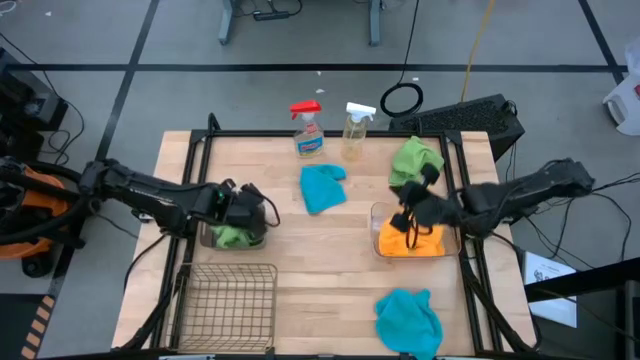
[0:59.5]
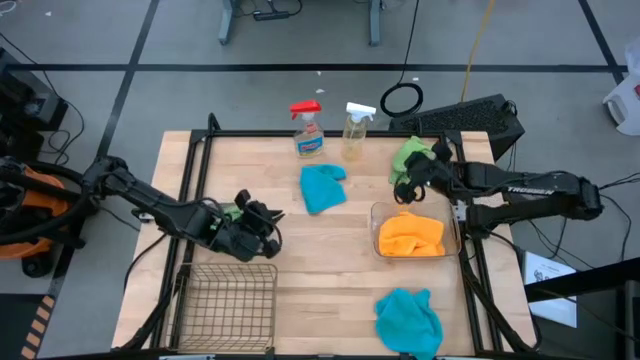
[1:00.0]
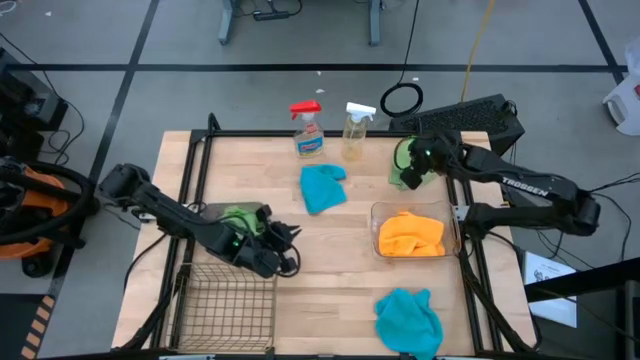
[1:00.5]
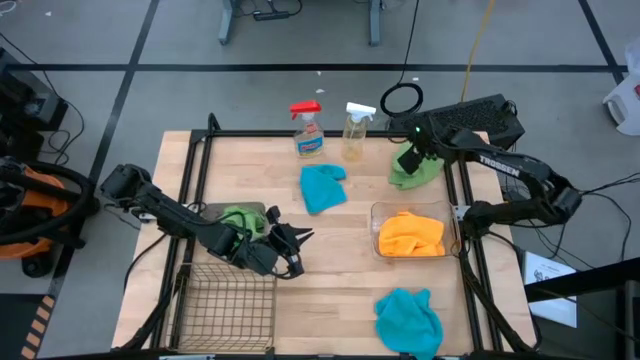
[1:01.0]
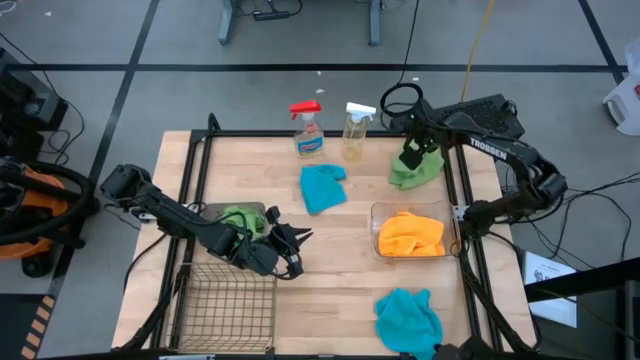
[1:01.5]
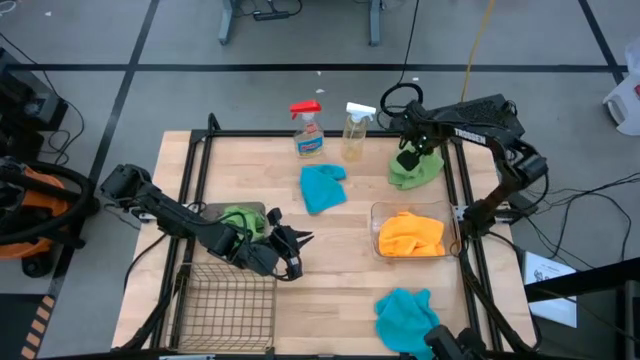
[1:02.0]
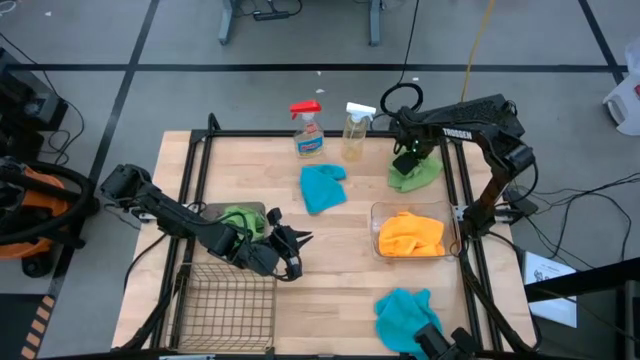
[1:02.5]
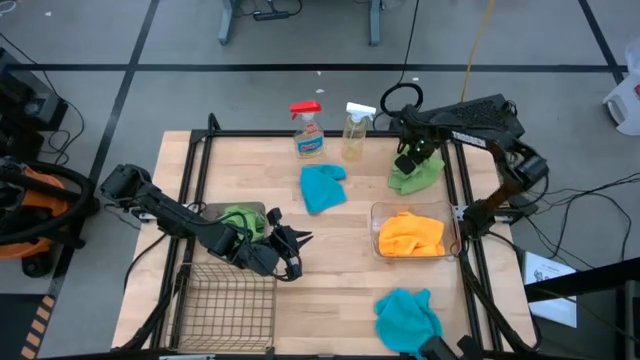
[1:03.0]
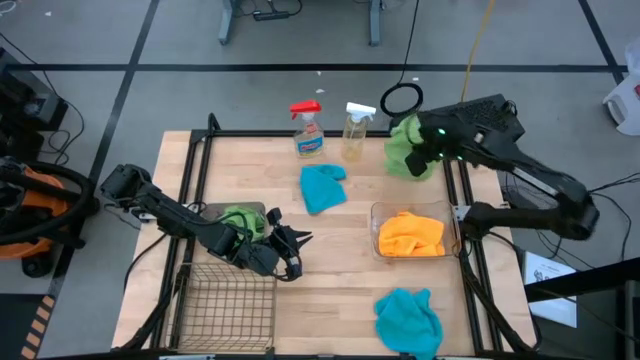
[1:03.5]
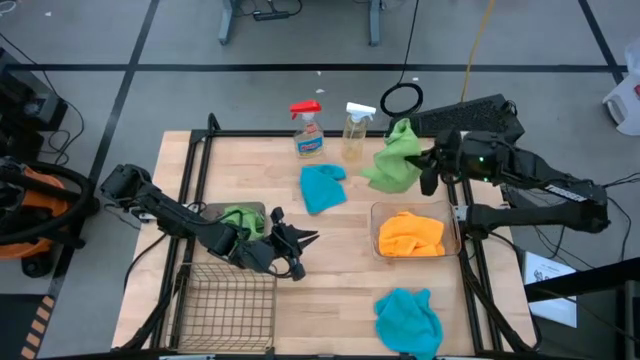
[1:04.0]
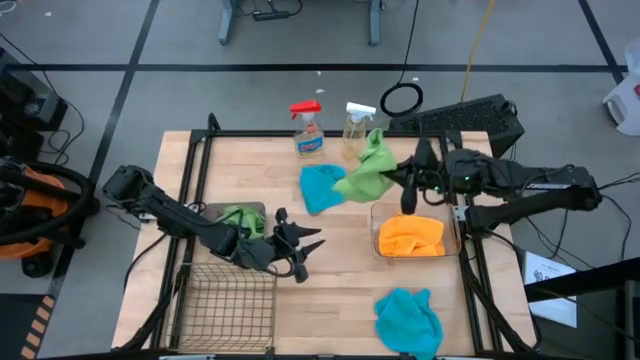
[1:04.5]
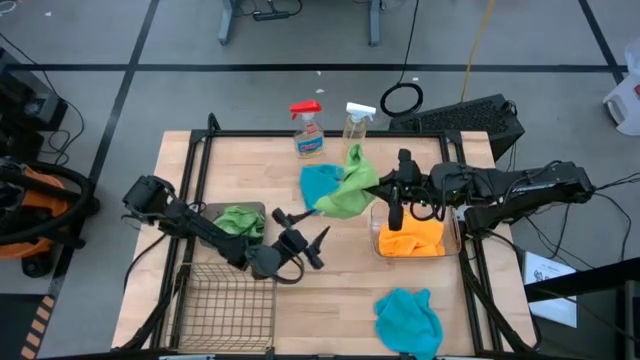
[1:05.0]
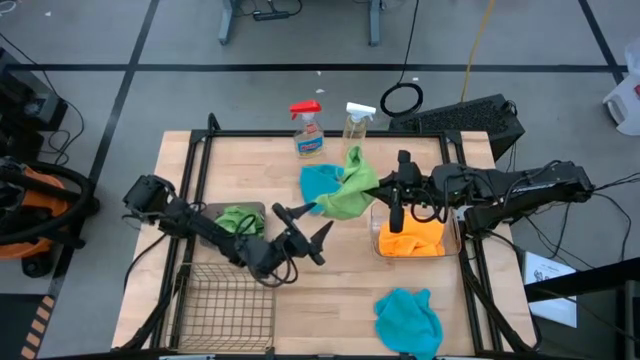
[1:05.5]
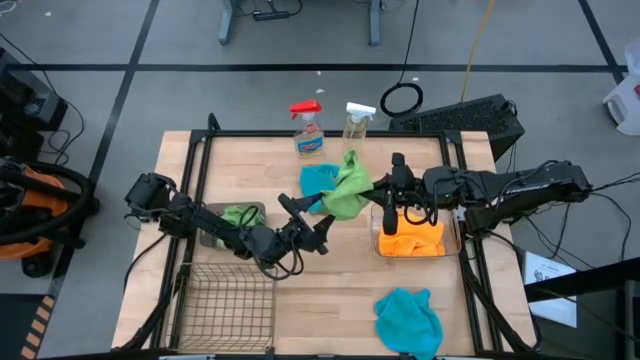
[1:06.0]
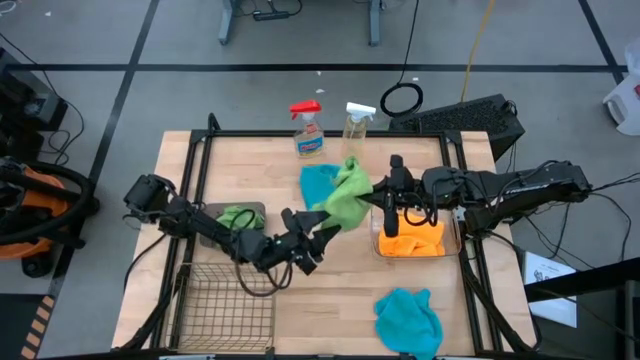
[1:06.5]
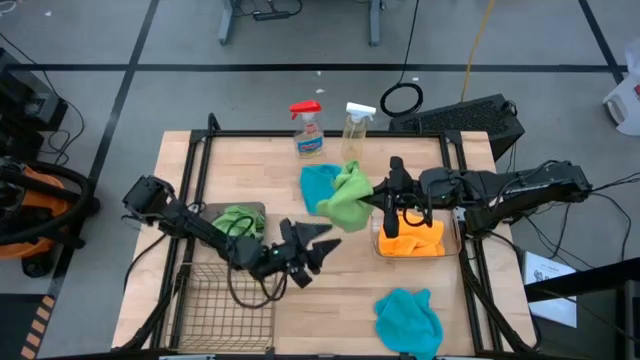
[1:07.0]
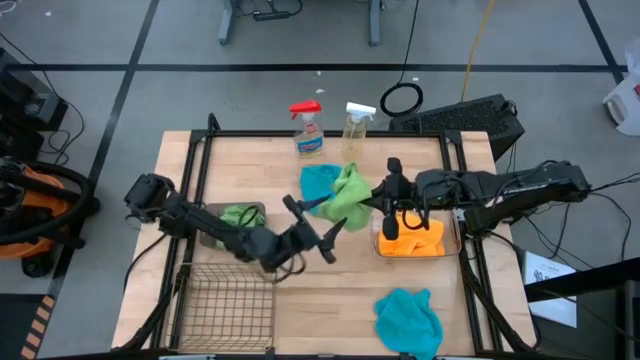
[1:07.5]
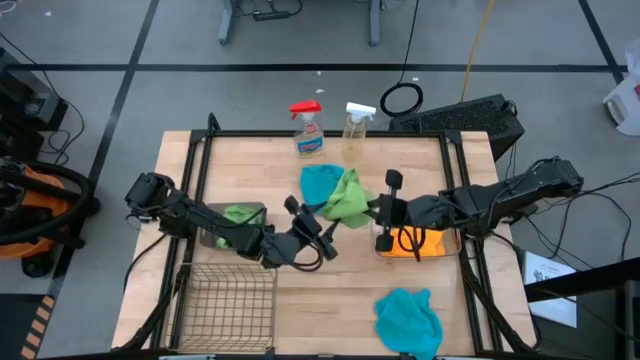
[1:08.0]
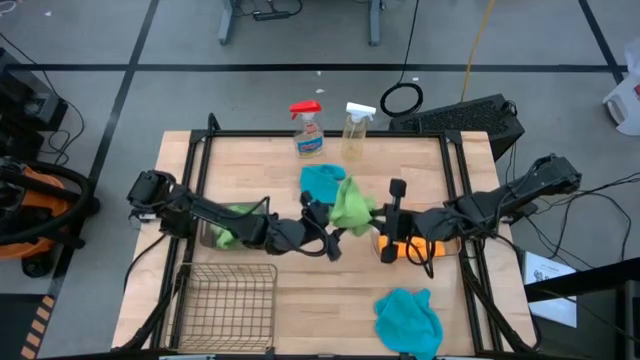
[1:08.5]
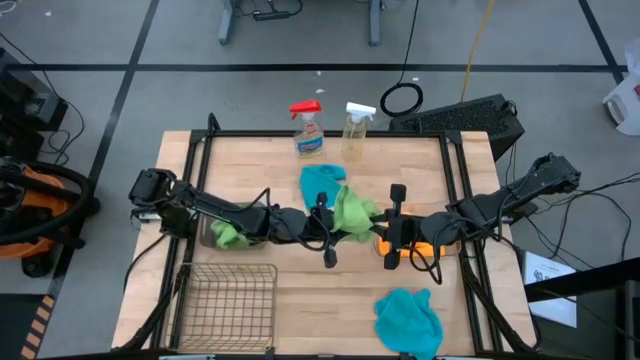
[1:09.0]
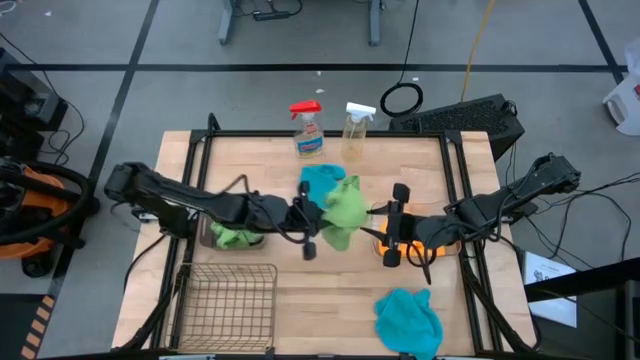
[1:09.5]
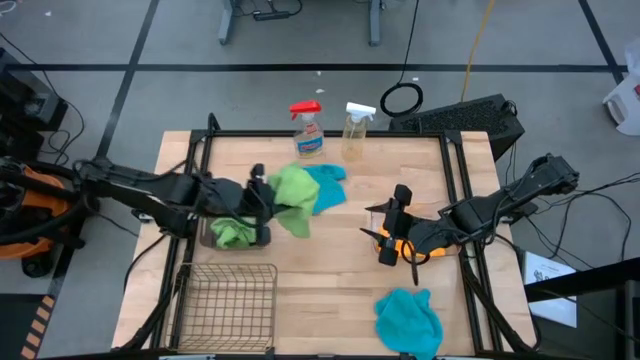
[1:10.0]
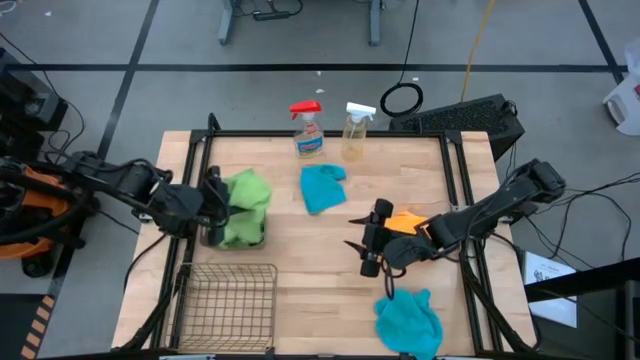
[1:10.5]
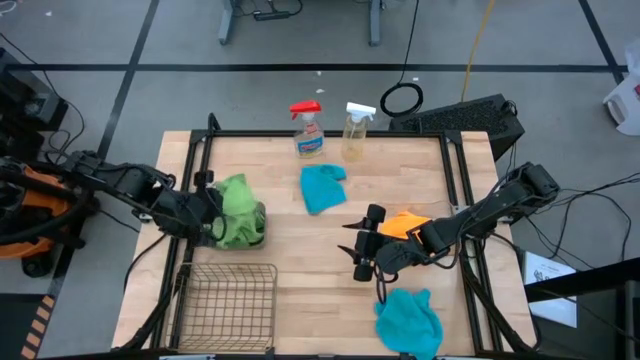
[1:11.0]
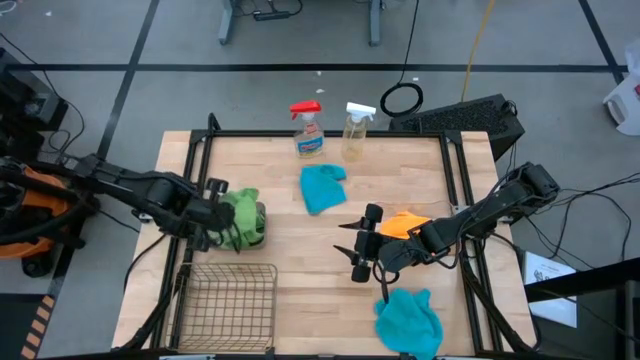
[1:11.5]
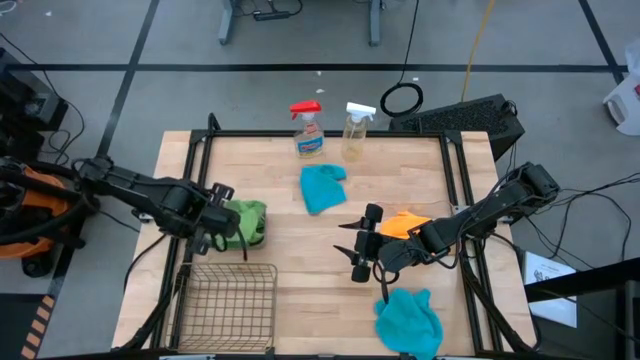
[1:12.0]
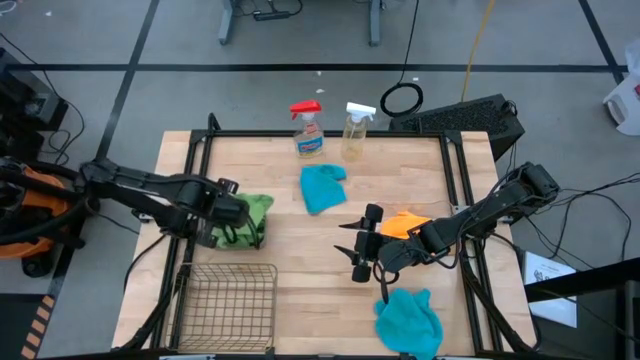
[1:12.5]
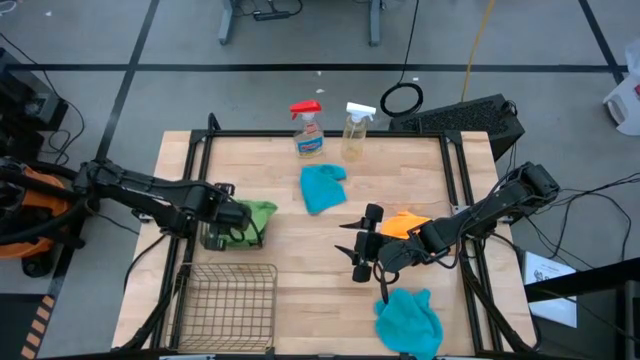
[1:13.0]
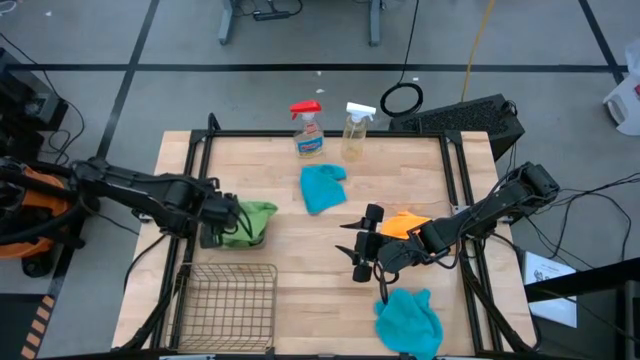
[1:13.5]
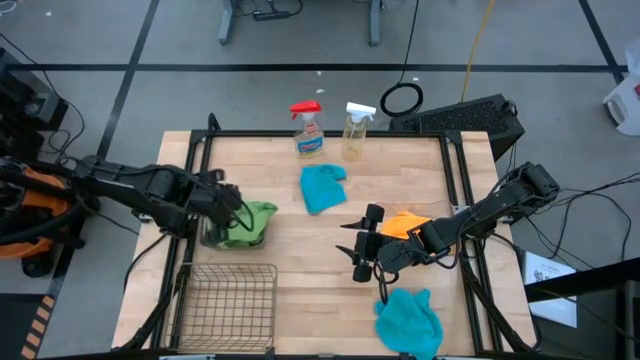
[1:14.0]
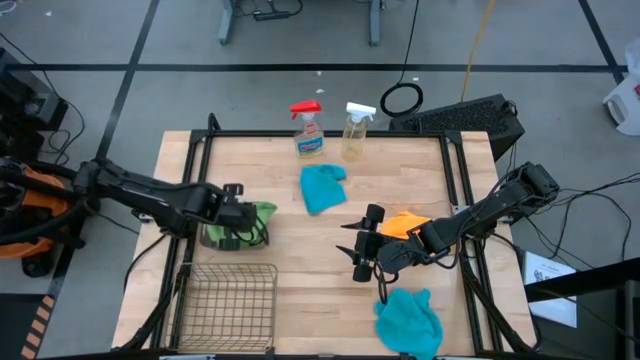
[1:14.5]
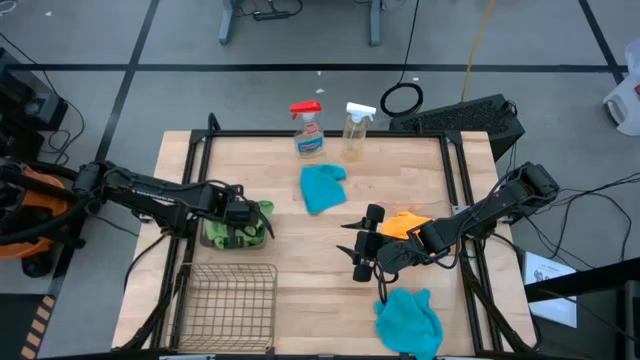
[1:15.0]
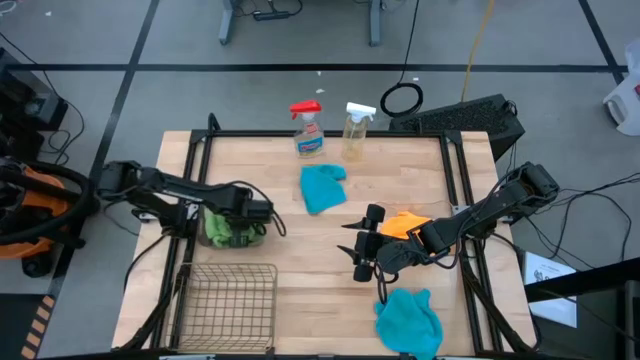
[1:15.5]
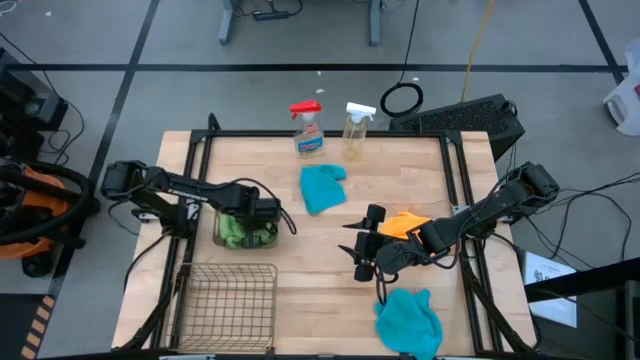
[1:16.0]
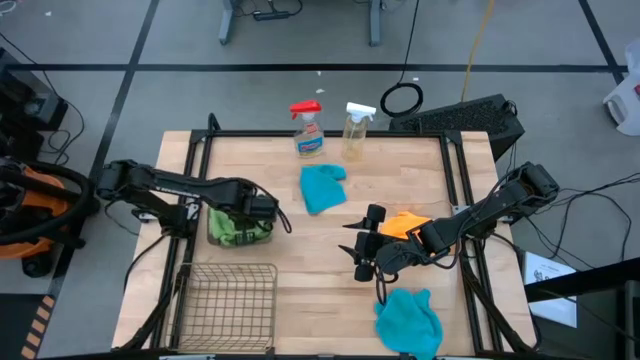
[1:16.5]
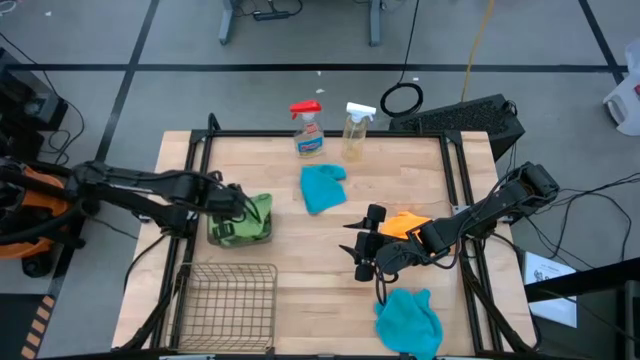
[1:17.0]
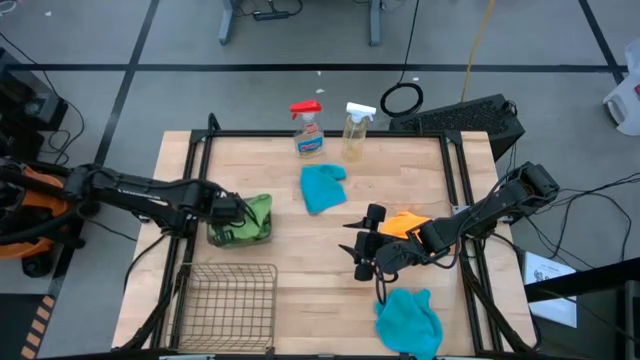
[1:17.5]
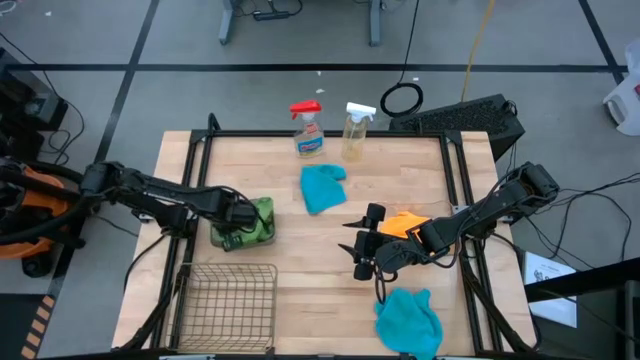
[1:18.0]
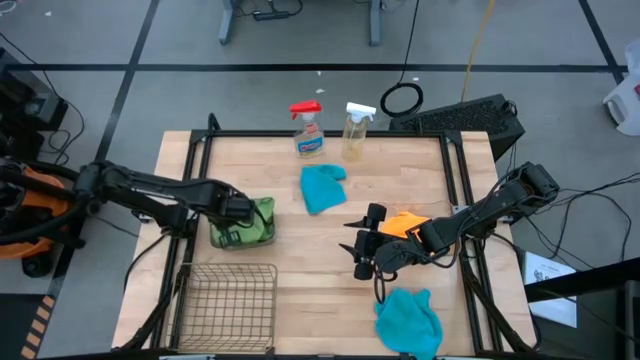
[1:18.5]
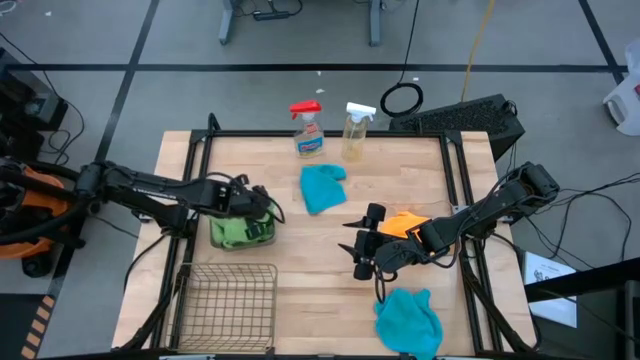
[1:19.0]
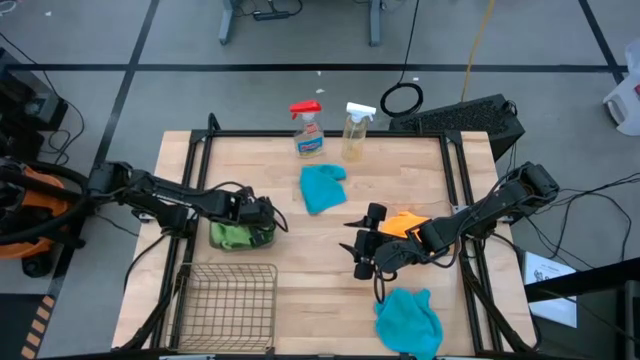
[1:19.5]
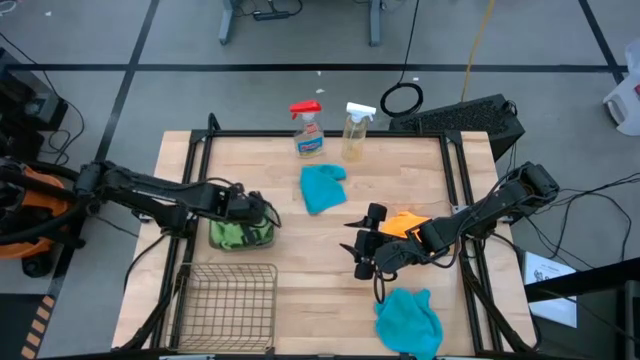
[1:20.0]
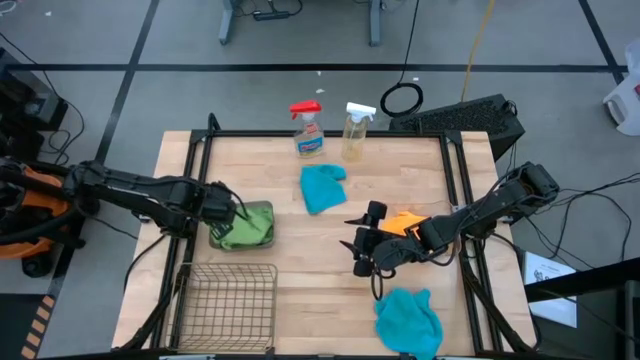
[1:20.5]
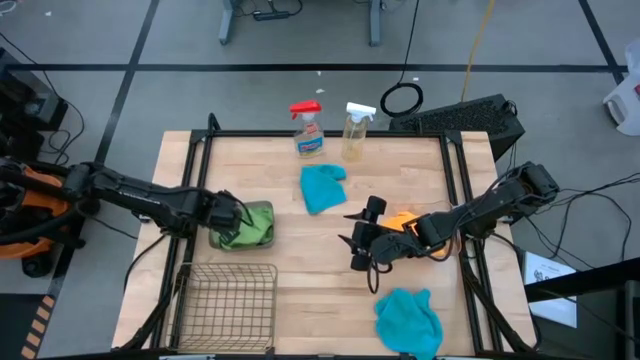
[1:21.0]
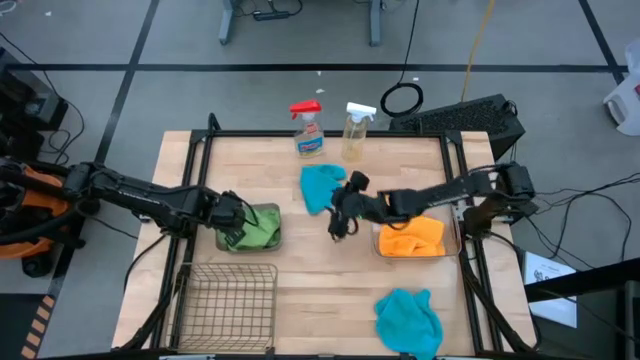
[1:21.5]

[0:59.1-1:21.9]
Task: Sort microfiber towel by color & place in baskets
Put the green microfiber towel into the black bin
